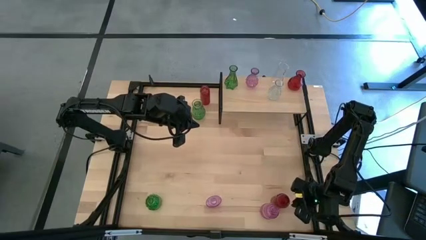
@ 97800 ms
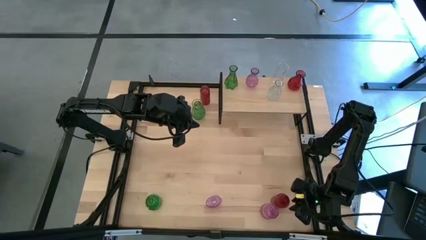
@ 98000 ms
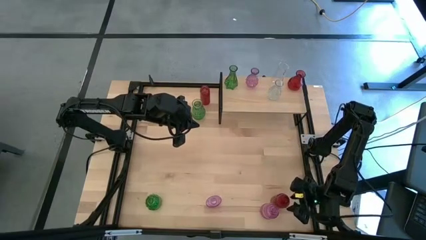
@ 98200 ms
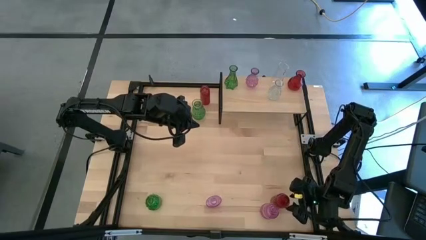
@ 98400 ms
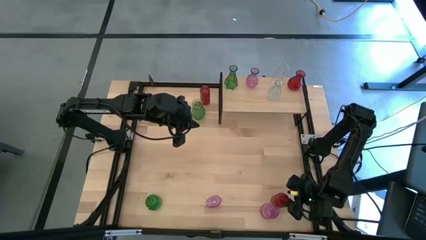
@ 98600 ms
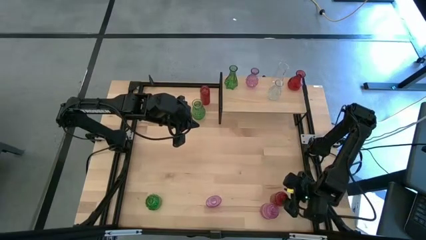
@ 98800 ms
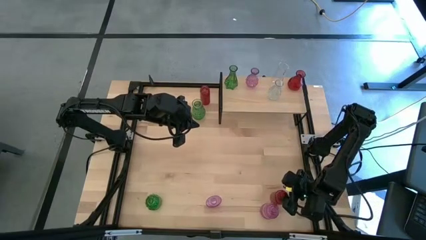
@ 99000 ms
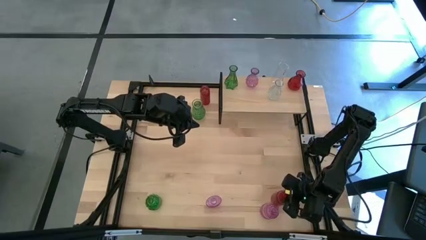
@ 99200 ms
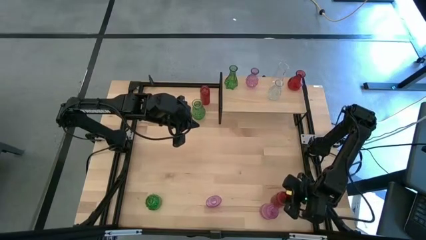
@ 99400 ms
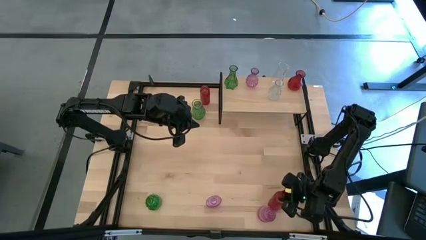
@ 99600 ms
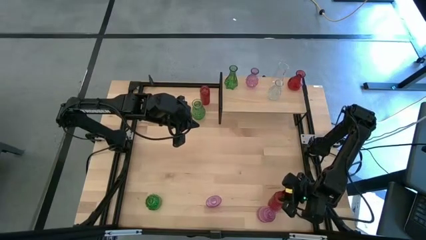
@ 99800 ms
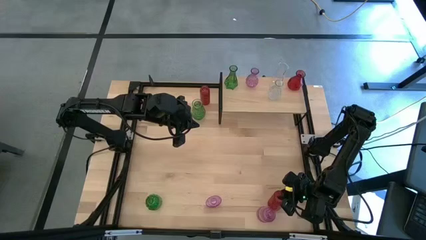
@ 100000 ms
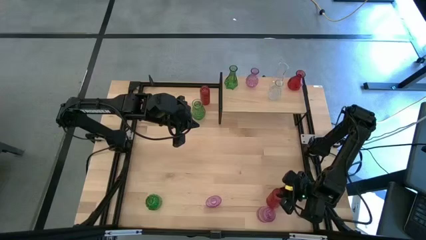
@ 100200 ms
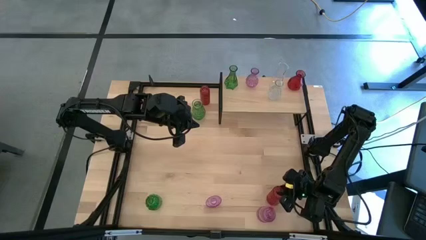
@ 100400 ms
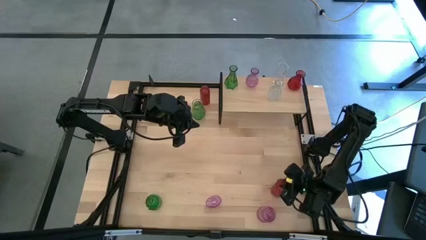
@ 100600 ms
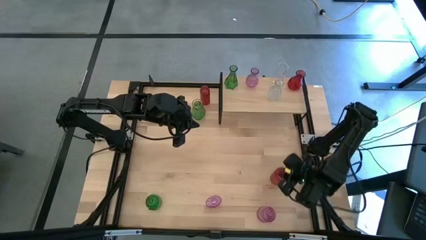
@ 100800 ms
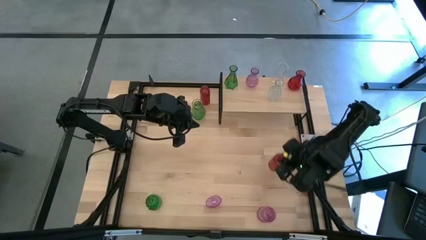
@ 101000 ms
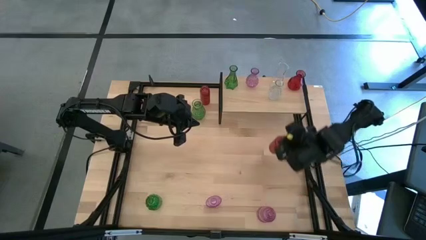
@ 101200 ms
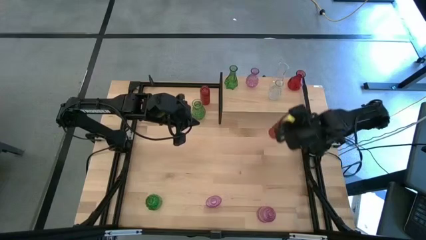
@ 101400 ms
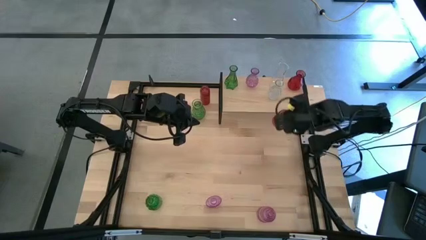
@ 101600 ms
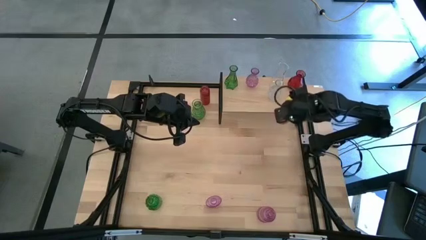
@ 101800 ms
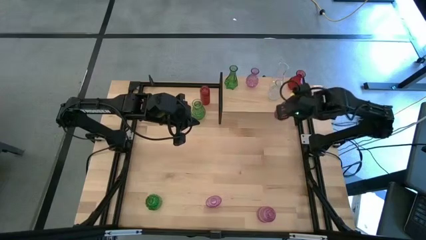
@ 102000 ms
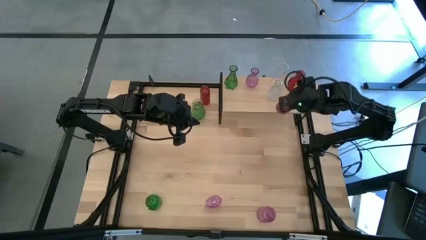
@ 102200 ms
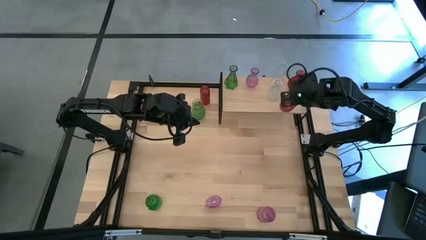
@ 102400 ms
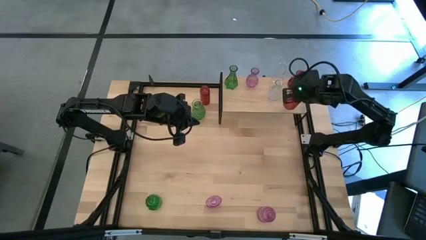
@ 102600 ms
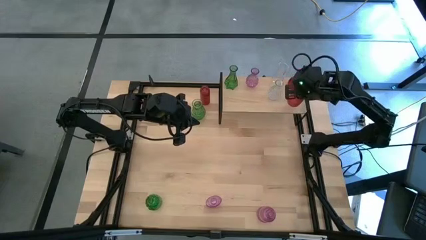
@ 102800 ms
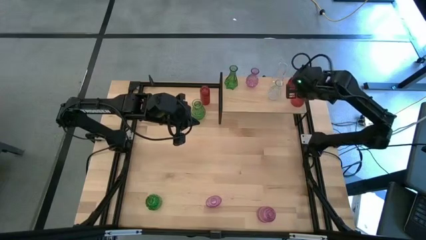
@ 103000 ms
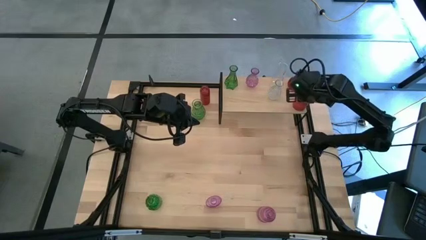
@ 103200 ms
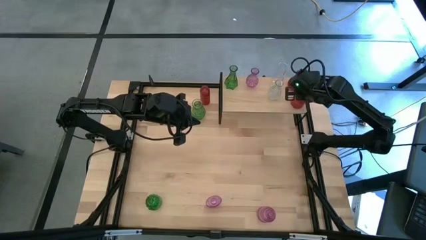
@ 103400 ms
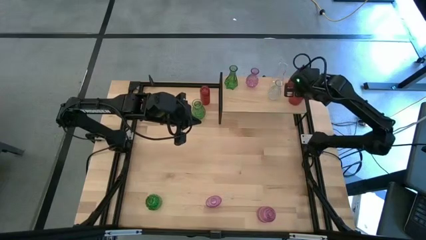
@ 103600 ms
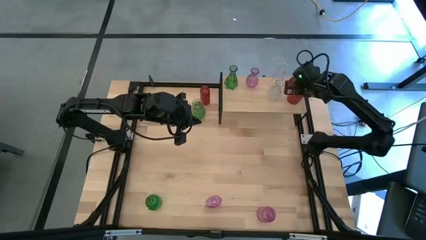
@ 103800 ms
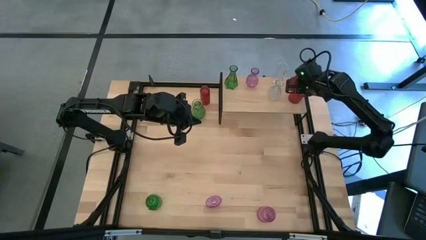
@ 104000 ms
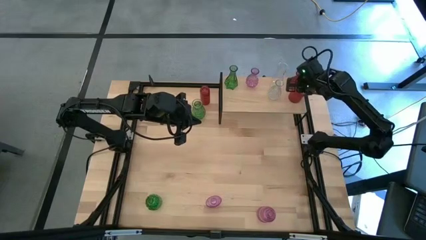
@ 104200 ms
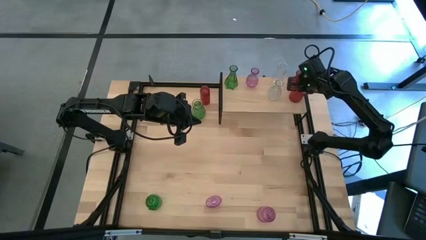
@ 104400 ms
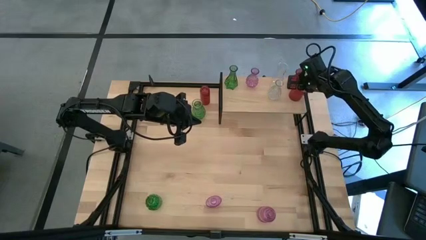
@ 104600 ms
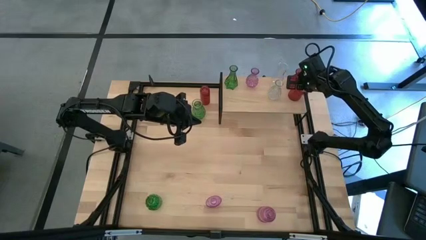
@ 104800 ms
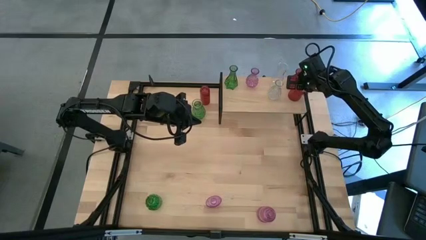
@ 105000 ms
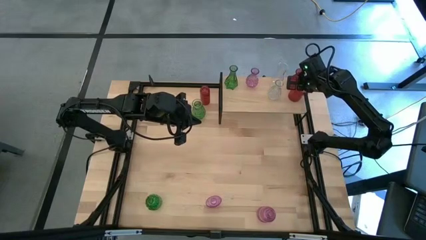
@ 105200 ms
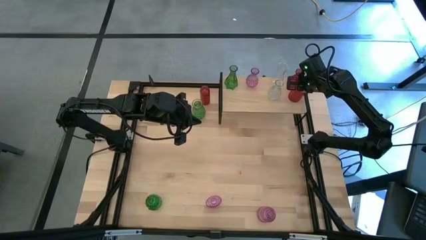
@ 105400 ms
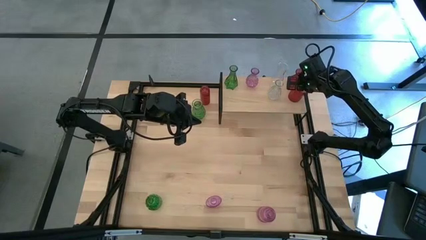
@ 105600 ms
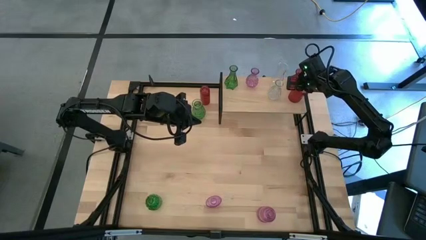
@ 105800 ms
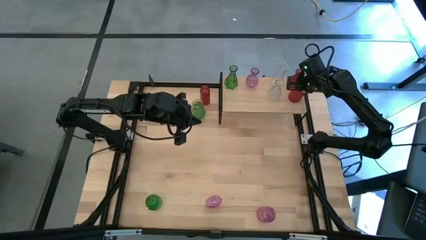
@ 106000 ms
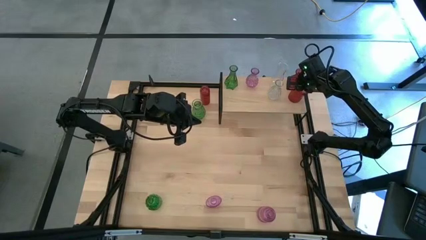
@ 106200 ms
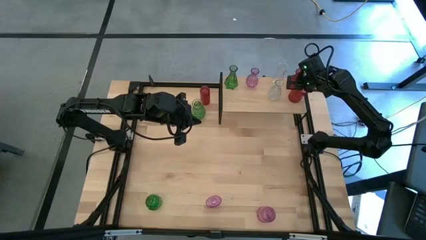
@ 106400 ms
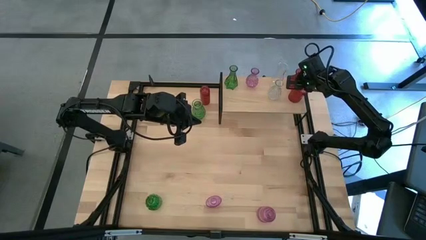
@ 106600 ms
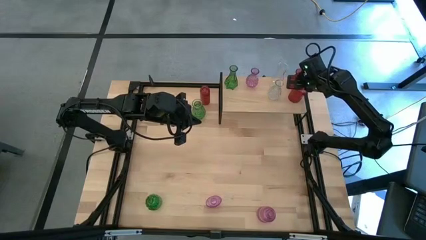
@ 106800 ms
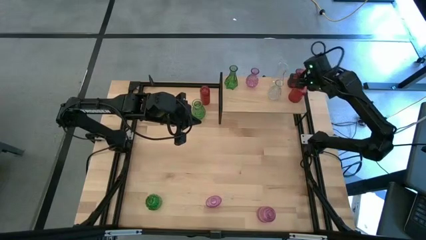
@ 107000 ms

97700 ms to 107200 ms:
Task: sort vases onto shelf
Put the bottom red vase on the shelf aligned with the other red vase

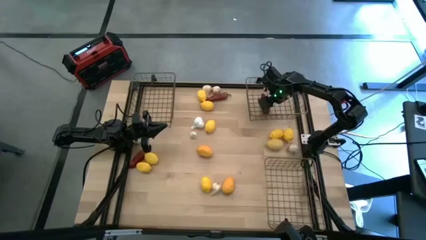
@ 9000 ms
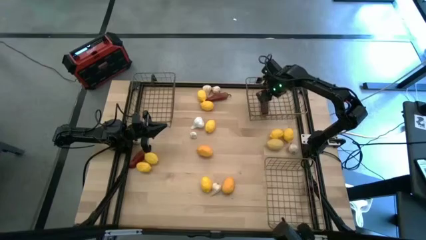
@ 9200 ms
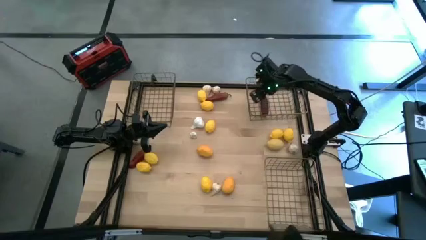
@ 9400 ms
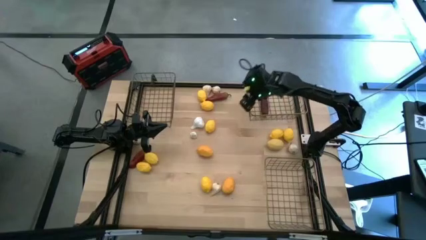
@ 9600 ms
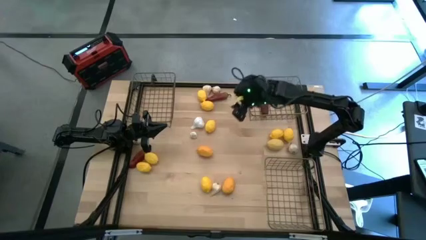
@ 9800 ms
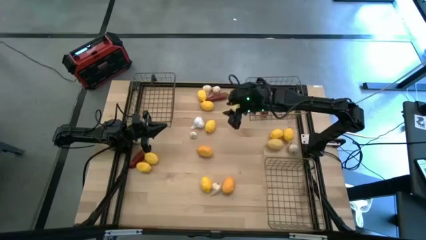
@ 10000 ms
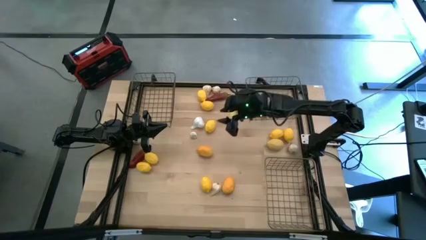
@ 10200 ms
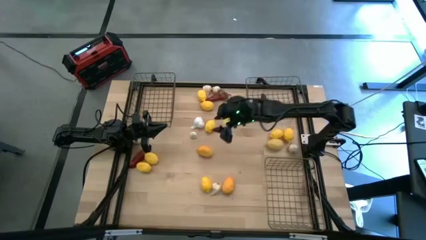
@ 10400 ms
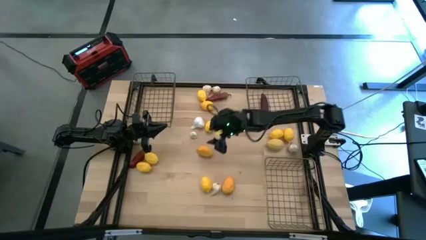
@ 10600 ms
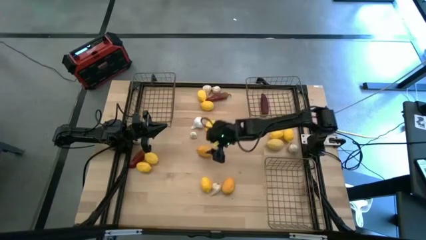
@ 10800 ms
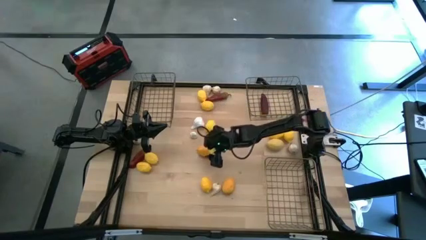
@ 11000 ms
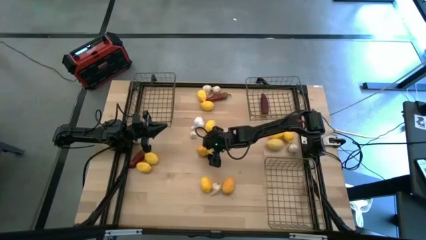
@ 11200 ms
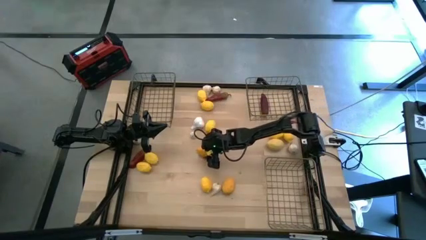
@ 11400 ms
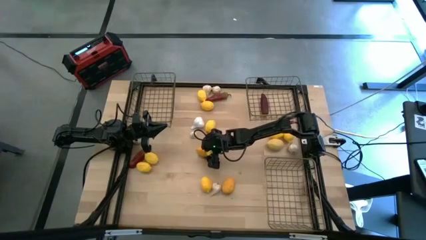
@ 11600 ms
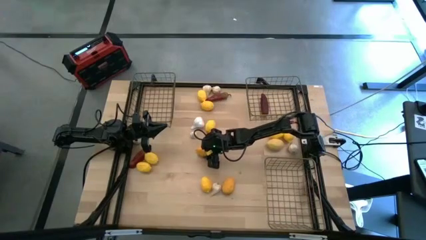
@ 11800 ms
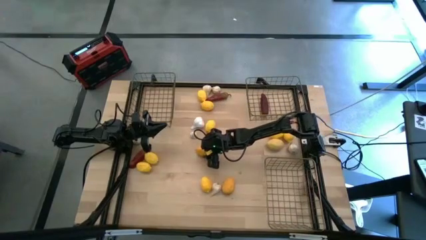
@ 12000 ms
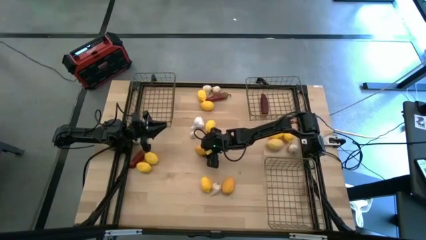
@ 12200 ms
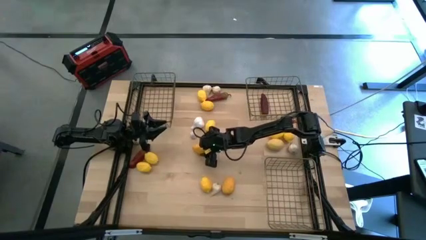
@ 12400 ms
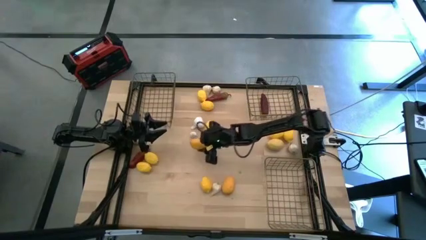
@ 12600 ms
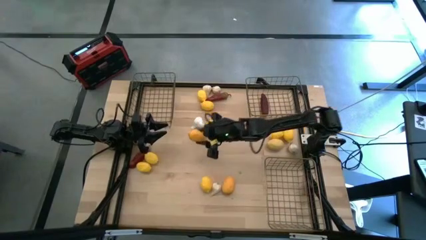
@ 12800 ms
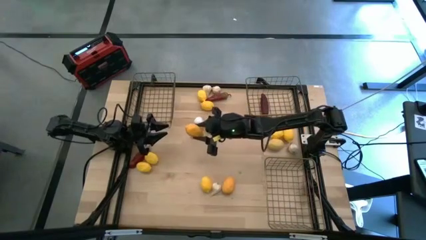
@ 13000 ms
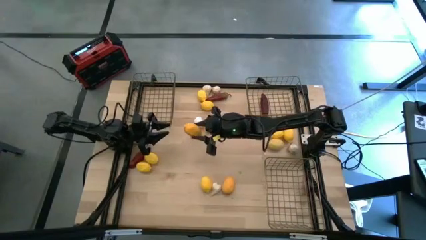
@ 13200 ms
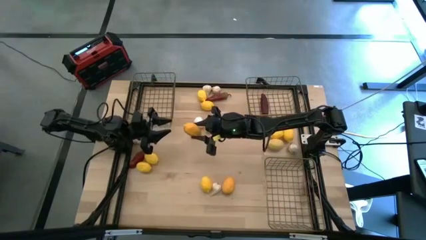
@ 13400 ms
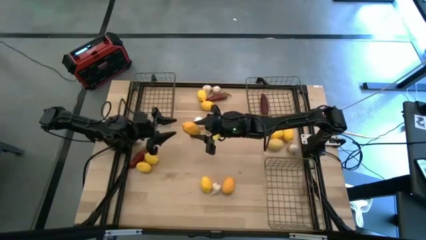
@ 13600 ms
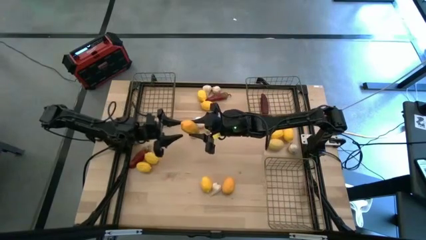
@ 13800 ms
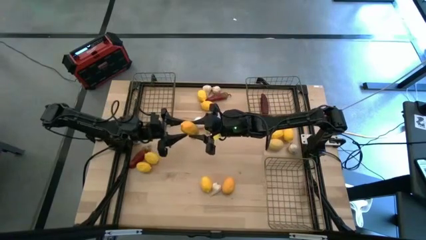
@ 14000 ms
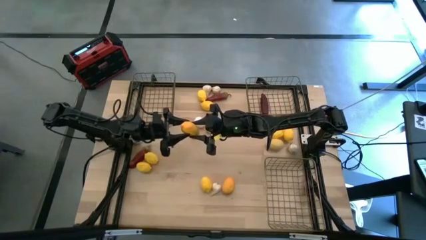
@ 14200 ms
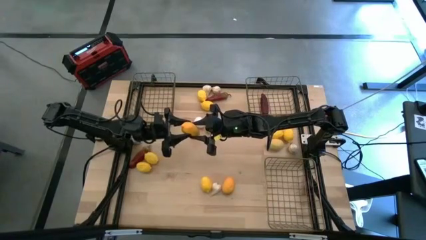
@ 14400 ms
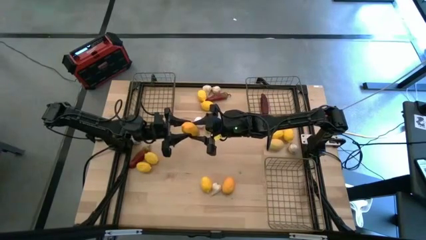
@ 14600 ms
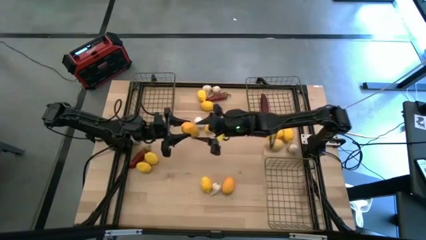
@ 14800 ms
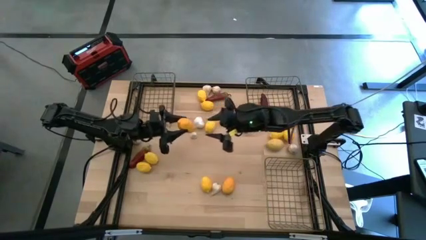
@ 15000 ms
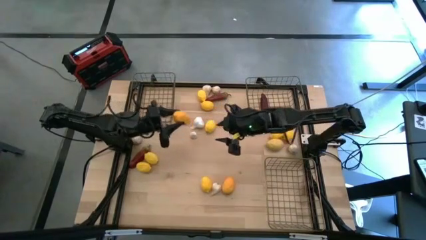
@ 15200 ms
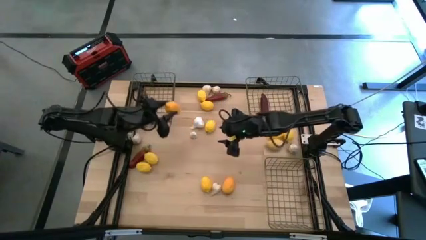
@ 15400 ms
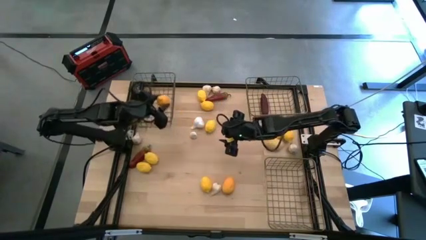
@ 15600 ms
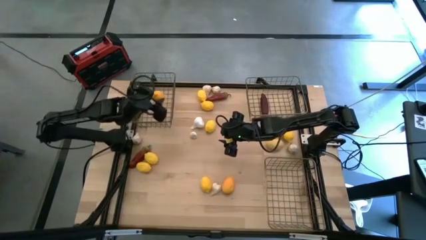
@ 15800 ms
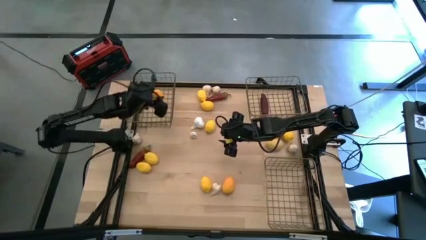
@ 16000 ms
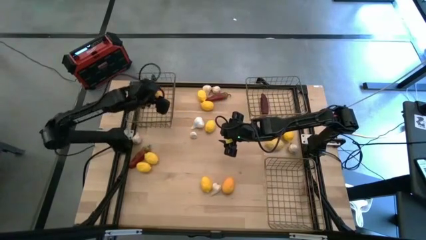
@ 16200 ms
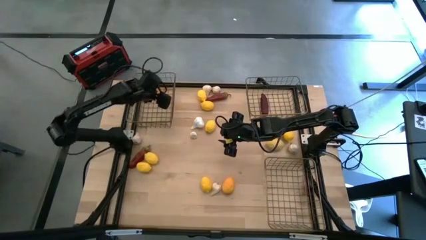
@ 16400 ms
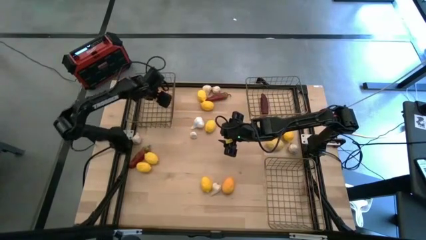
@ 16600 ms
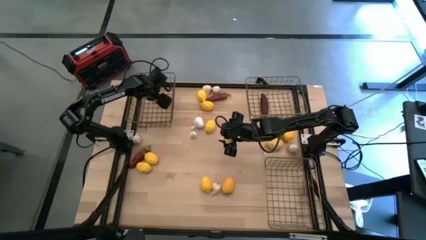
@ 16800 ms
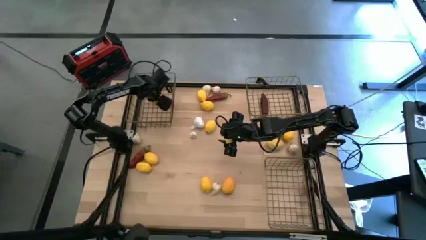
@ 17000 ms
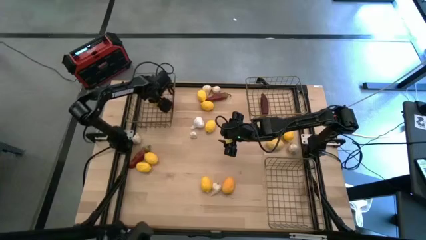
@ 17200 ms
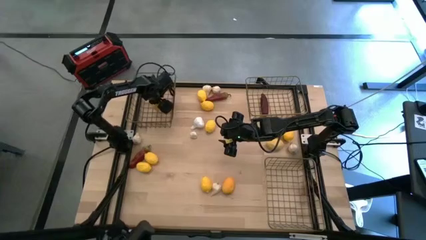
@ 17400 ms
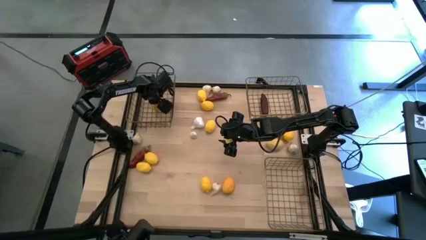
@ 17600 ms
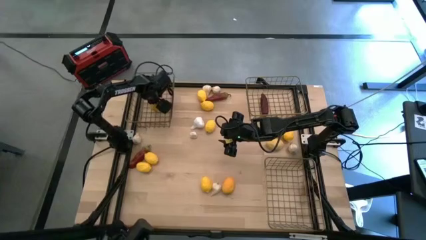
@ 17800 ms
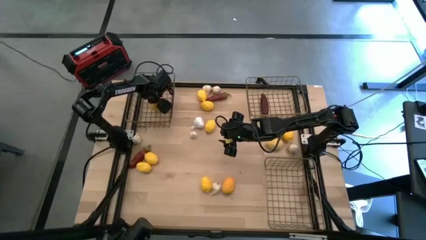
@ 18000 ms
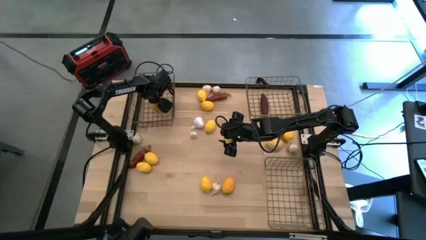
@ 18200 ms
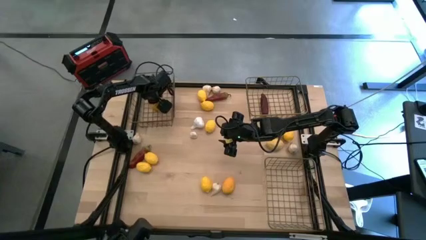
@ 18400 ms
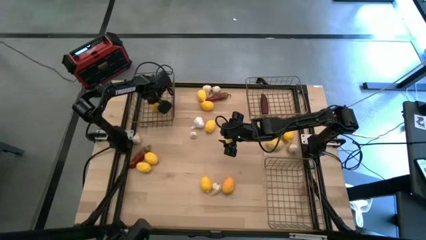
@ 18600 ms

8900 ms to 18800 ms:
Task: Sort produce into baskets
Put the yellow lemon into the top left wire basket
